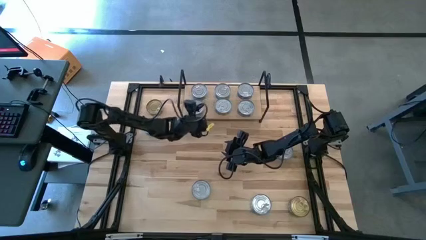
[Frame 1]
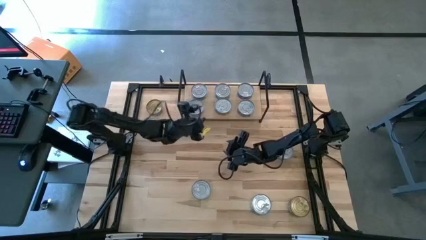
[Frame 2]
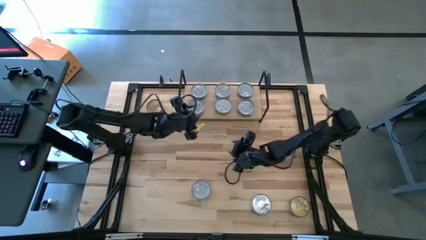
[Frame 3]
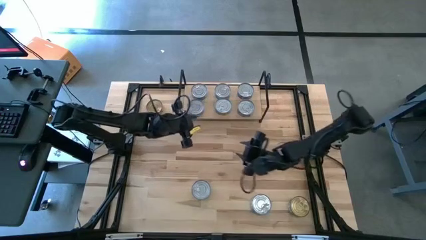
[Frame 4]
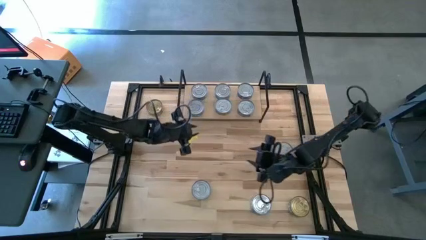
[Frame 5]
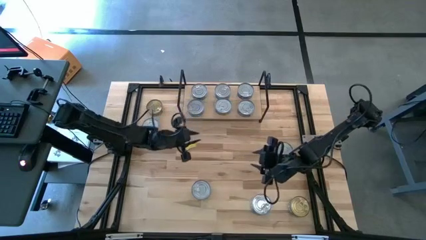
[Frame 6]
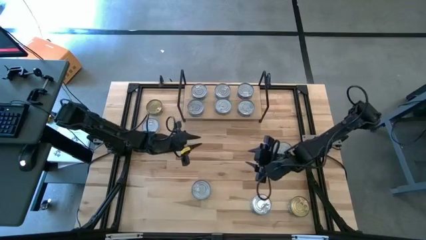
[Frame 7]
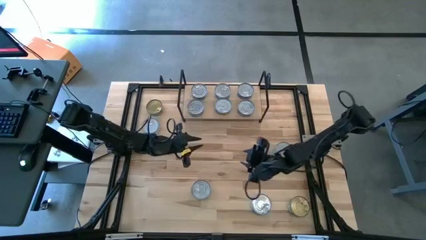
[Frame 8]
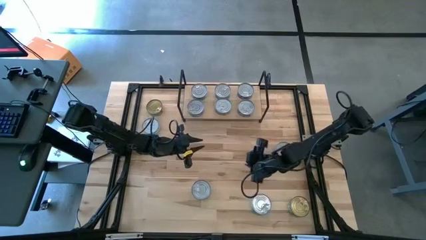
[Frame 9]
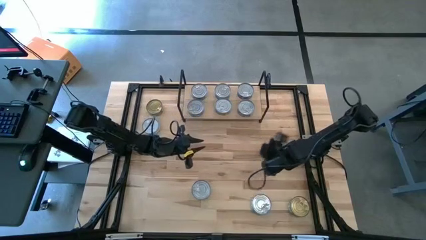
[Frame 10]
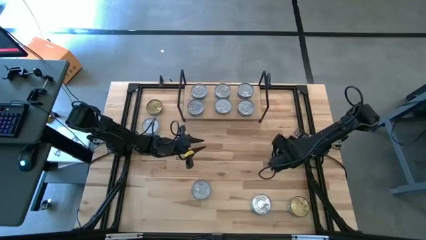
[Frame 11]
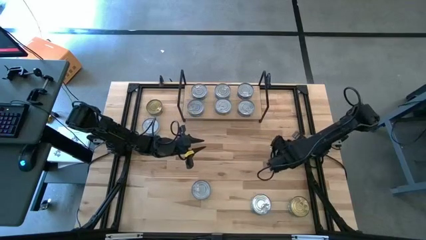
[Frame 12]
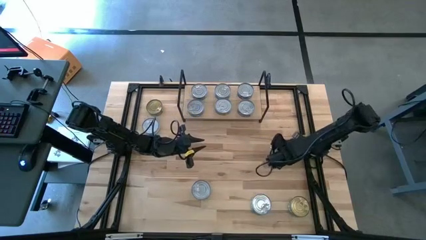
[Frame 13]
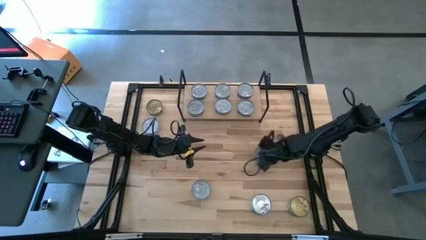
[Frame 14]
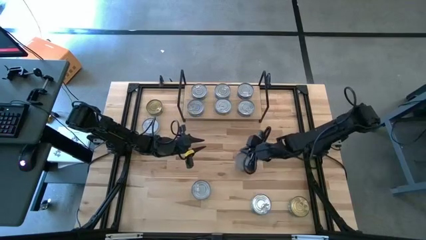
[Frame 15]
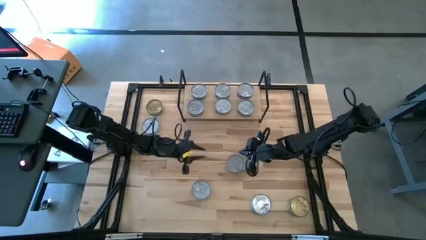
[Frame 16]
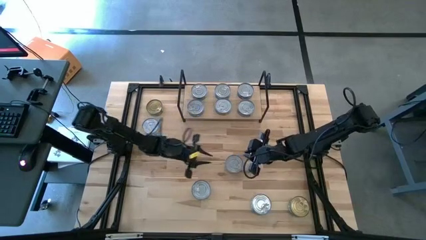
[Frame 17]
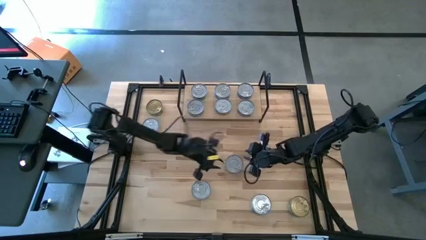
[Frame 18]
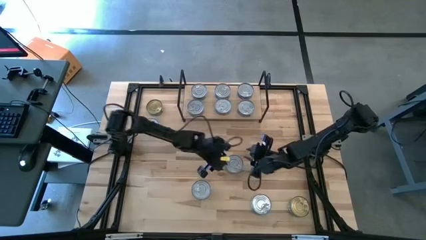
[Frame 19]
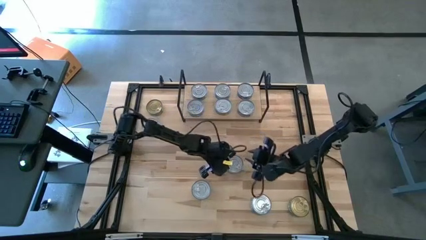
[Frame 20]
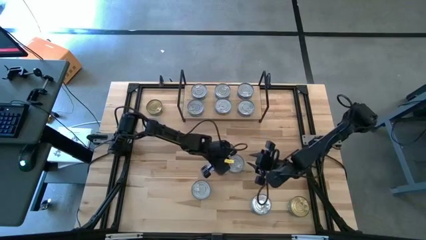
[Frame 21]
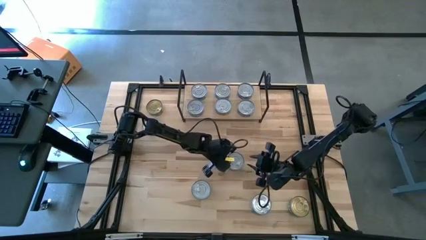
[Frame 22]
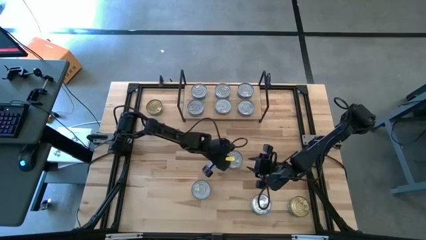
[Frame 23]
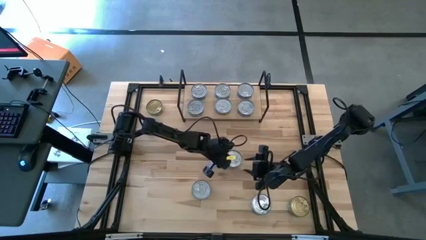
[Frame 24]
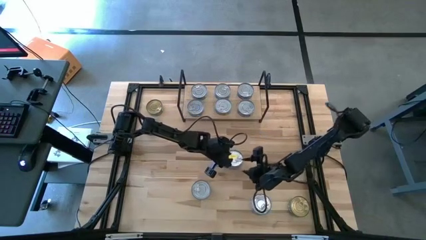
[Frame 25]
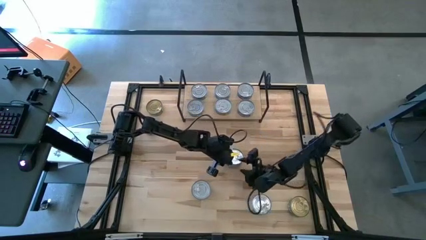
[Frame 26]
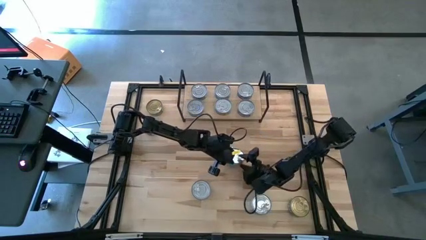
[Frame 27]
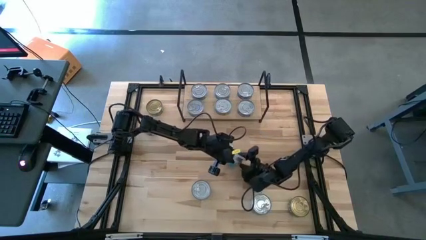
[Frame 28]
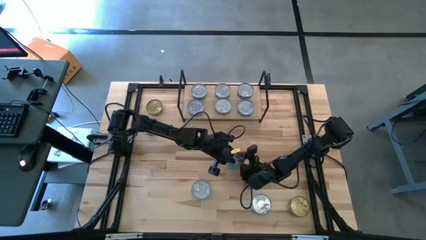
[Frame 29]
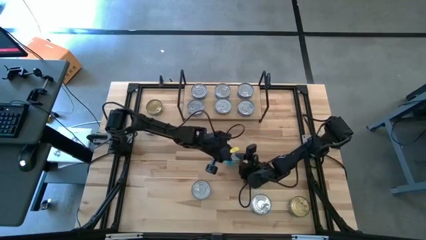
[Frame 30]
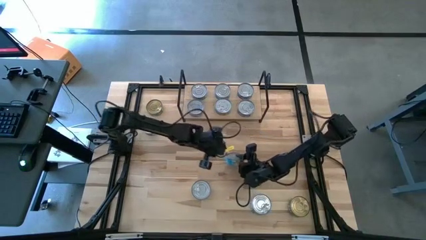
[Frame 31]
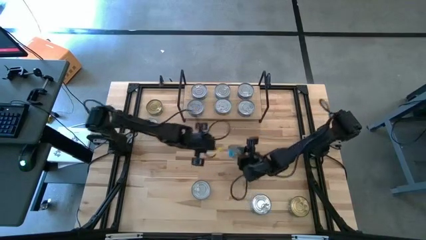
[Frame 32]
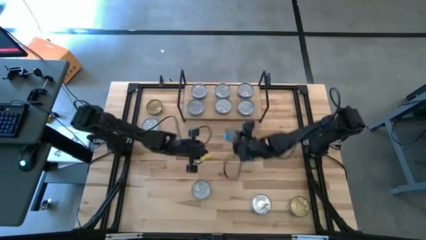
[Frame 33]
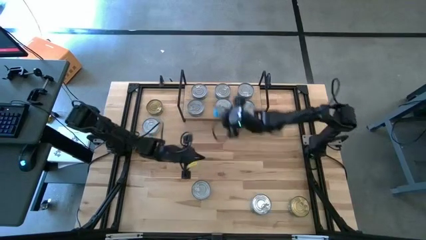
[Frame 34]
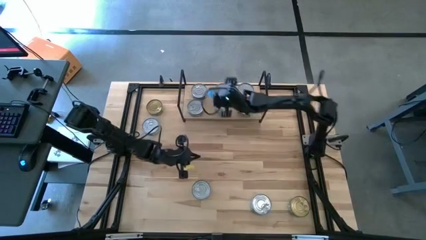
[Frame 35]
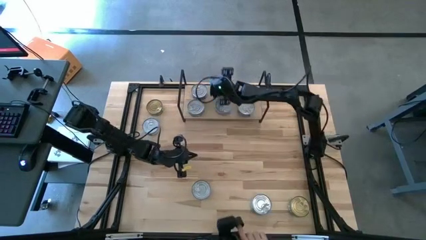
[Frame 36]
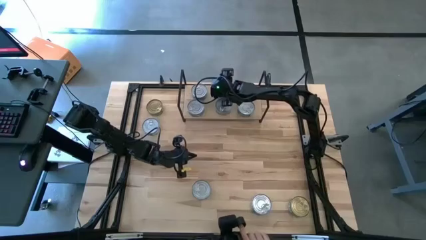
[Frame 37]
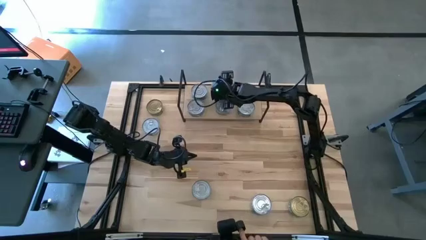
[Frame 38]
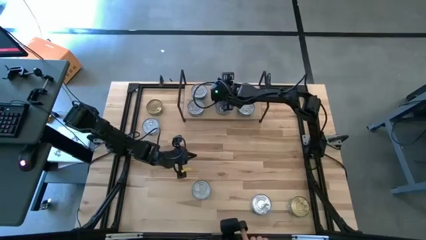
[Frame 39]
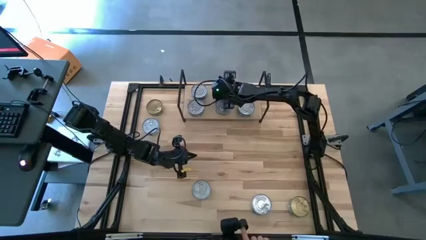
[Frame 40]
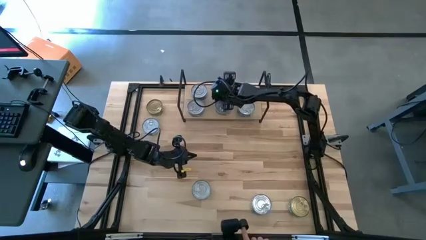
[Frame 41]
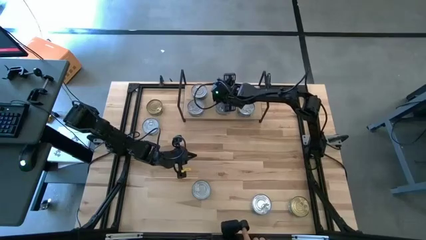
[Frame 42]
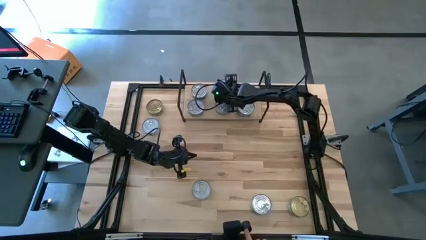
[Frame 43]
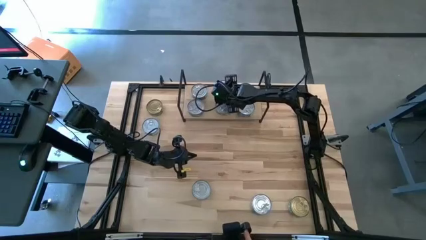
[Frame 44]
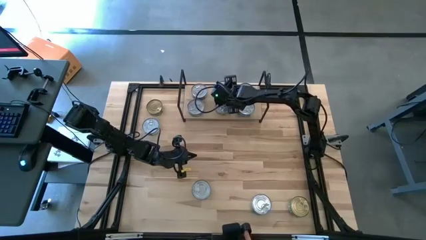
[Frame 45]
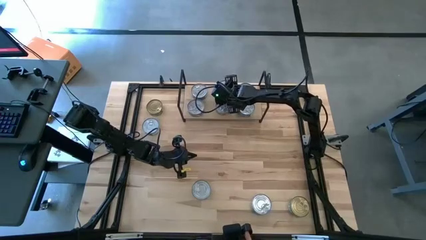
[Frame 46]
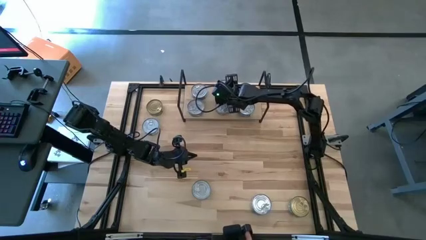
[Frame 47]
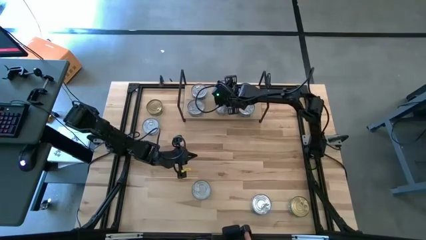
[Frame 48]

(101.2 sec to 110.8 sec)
Task: Stack canned seafood by type on shelf
Stack the light blue tuna can on top of the light blue tuna can on the shelf

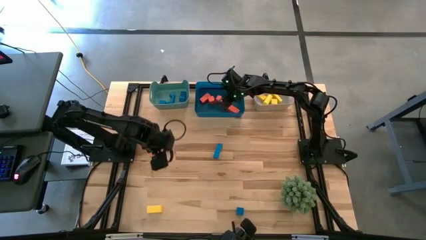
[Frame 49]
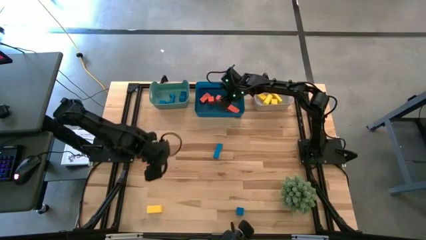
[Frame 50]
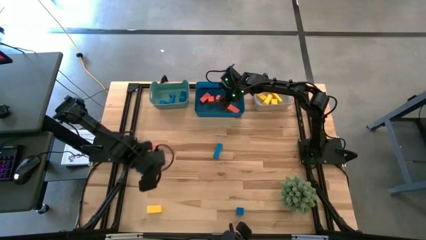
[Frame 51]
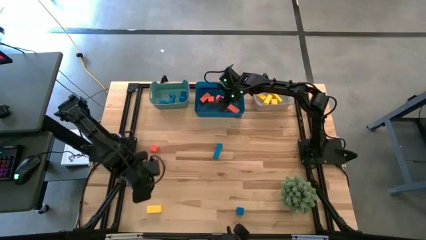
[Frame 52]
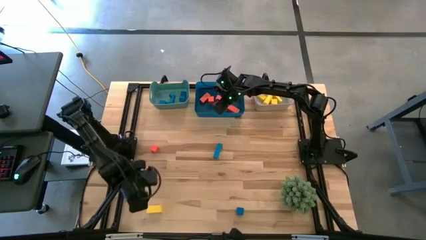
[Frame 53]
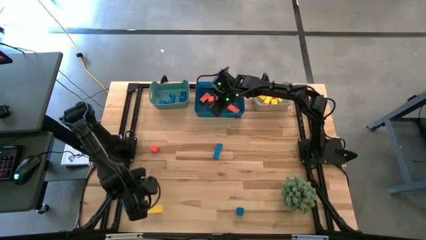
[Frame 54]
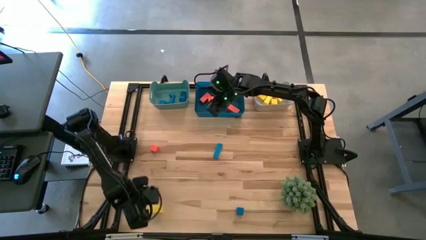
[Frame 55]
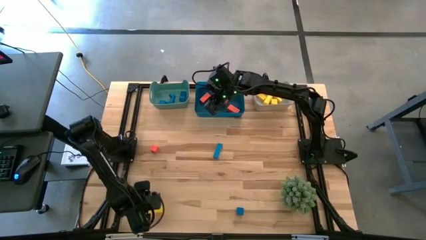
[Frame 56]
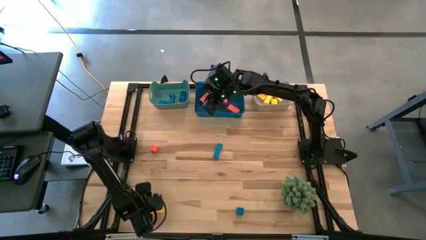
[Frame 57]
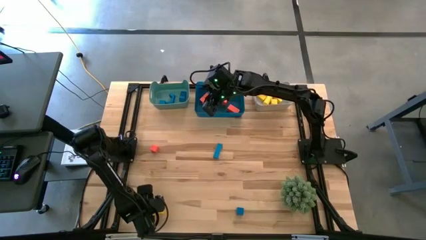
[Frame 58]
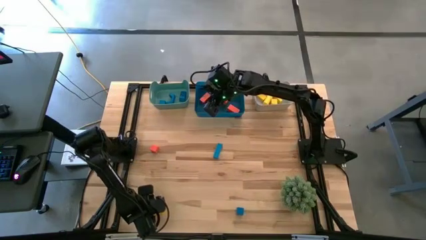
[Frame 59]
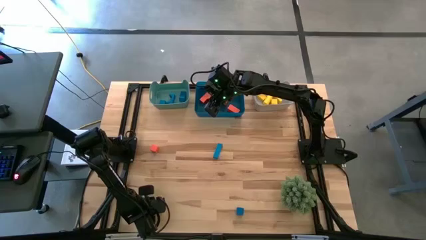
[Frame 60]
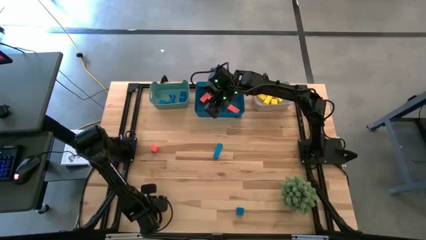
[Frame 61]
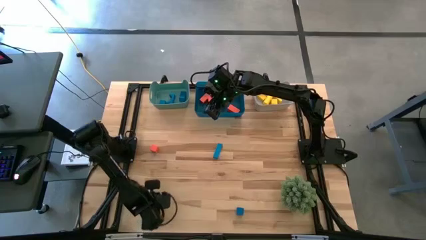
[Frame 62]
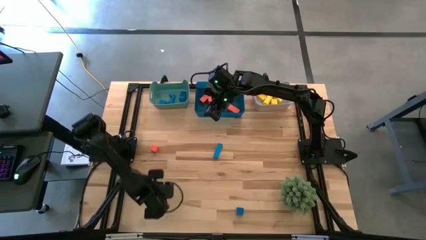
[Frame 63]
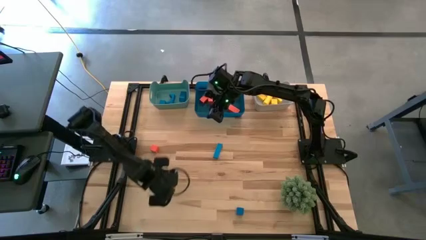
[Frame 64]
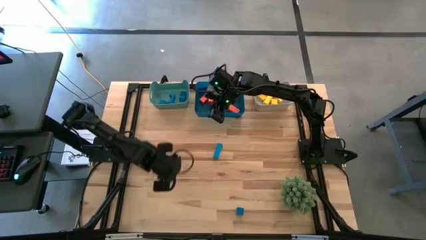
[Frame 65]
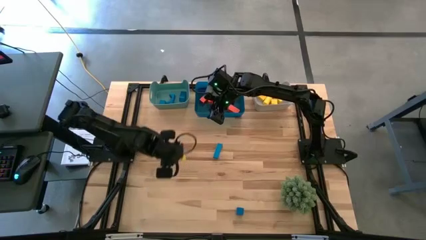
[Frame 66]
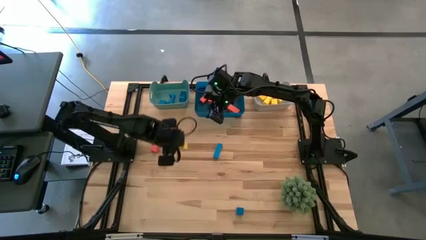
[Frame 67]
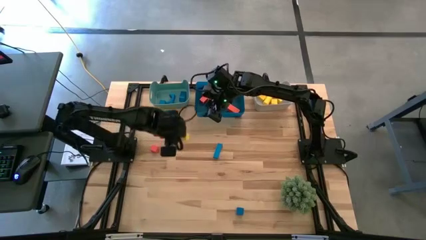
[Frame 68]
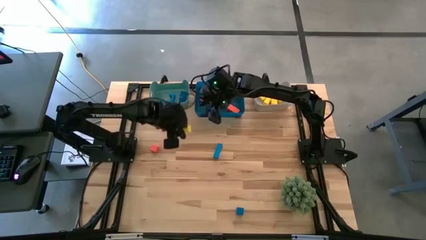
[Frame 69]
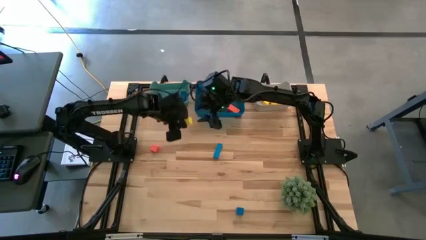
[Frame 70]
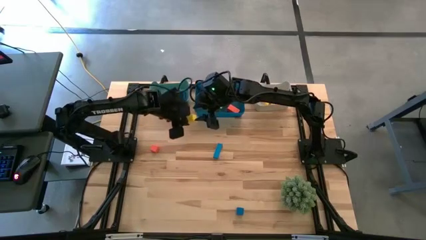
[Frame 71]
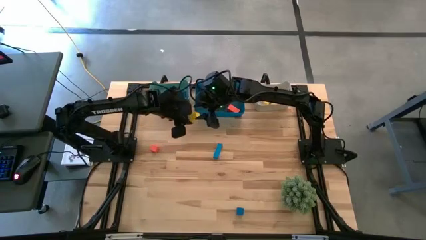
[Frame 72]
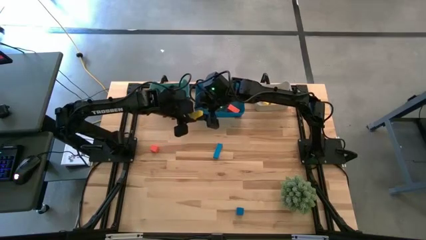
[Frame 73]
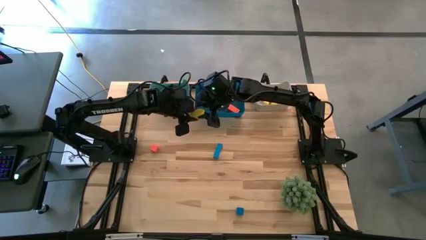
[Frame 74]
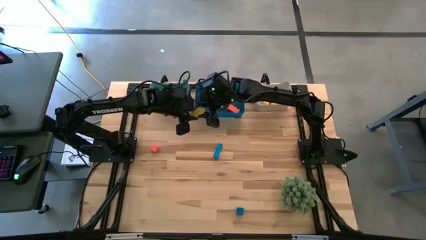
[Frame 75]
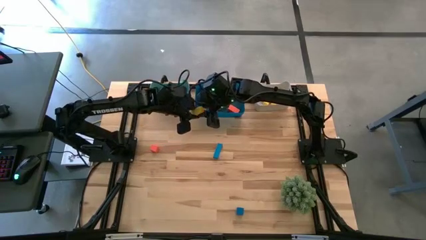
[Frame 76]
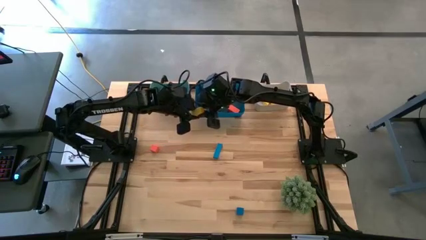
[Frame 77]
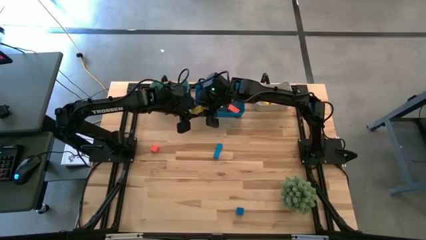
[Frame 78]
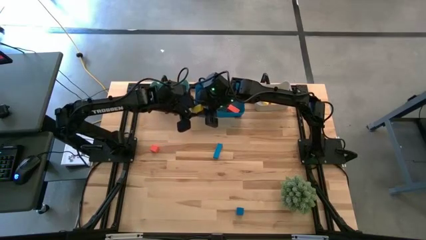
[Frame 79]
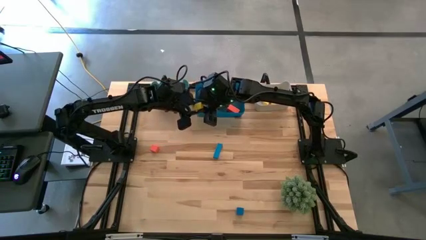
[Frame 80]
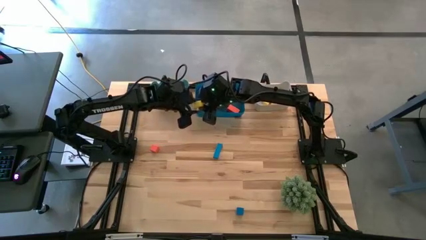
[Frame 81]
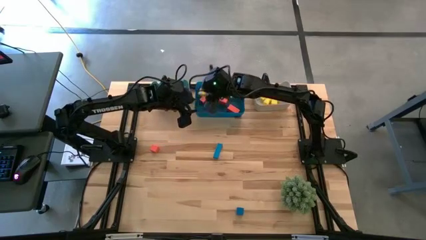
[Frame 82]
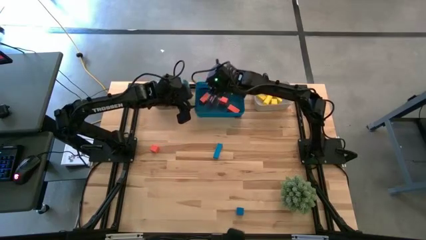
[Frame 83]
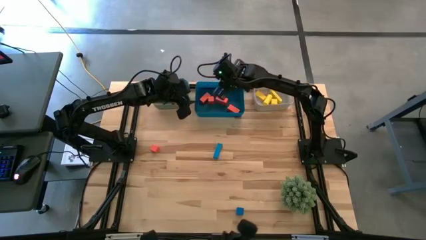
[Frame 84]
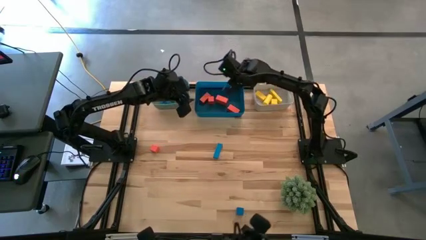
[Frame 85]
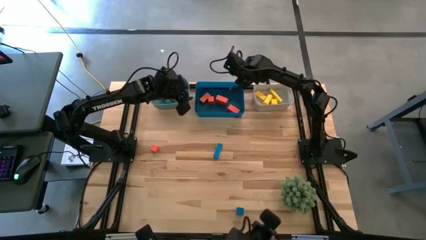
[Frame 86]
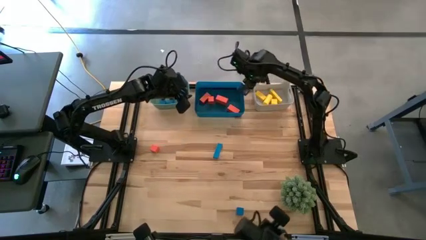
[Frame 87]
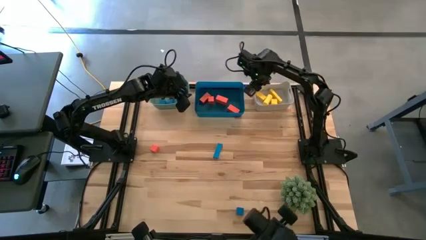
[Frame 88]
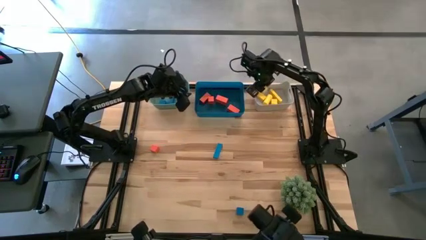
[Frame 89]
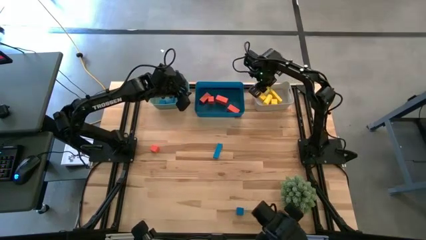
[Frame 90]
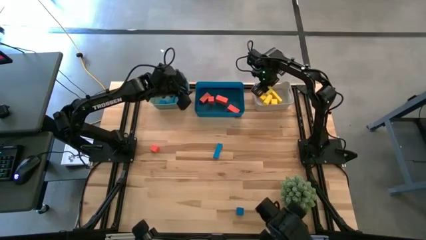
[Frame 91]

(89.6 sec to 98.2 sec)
Task: Sort & place blocks by color
Put the yellow block into the white bin
